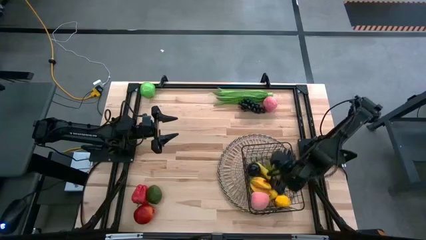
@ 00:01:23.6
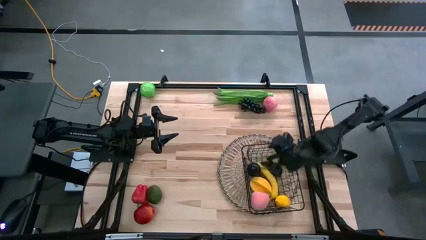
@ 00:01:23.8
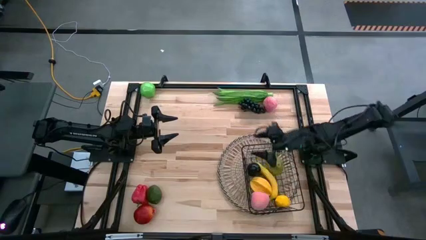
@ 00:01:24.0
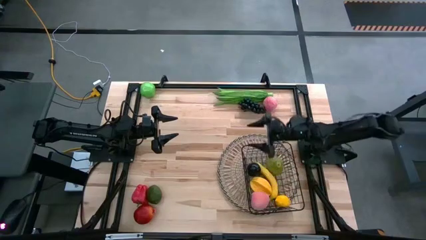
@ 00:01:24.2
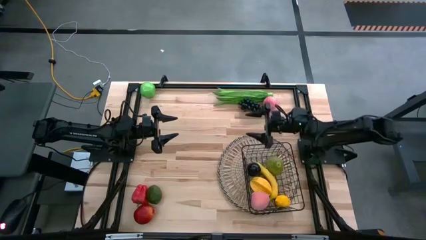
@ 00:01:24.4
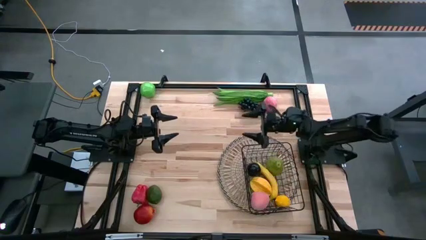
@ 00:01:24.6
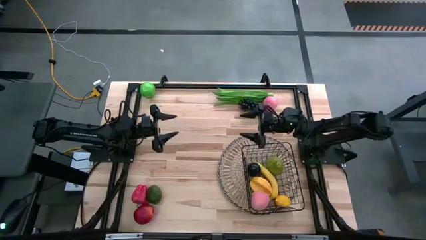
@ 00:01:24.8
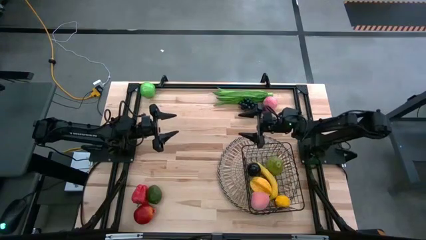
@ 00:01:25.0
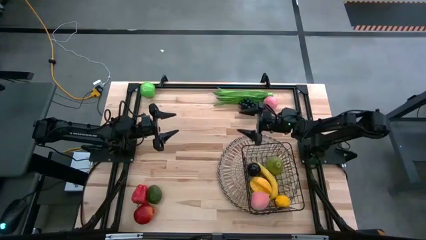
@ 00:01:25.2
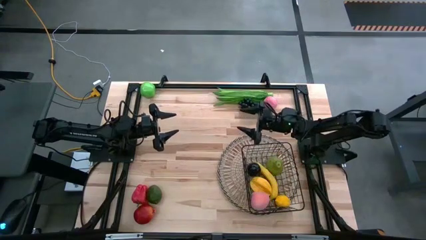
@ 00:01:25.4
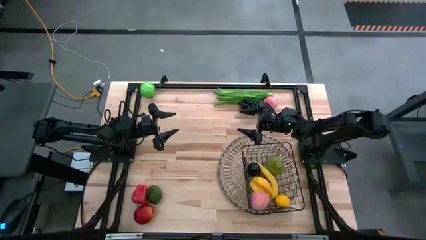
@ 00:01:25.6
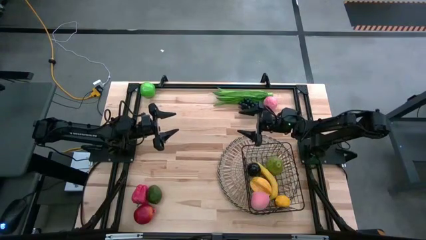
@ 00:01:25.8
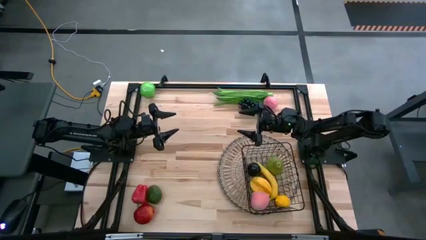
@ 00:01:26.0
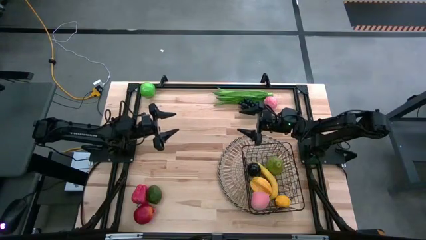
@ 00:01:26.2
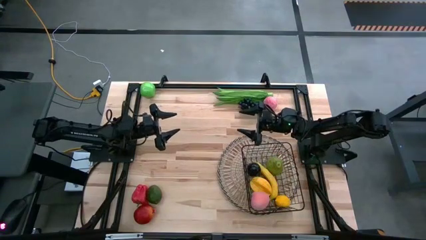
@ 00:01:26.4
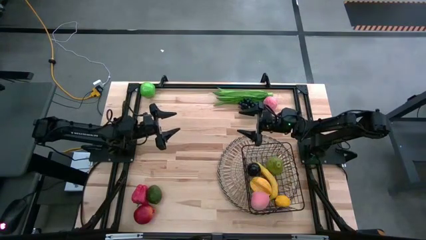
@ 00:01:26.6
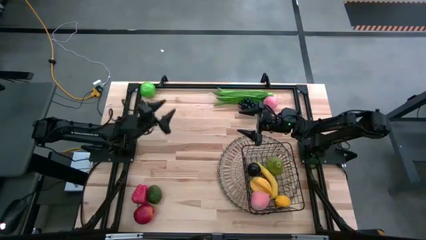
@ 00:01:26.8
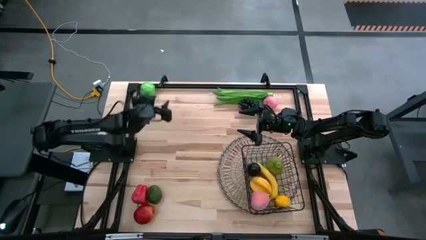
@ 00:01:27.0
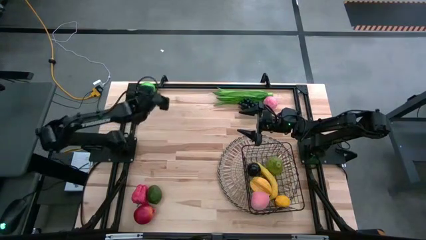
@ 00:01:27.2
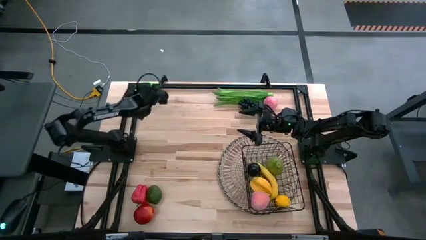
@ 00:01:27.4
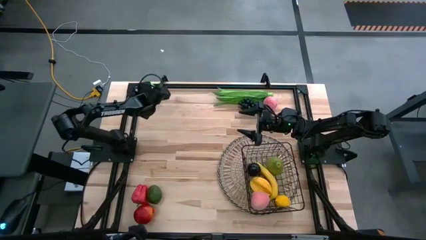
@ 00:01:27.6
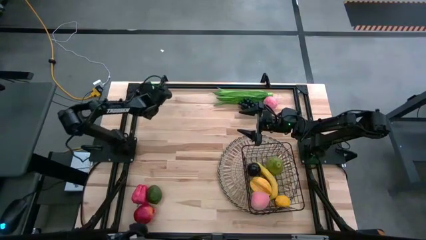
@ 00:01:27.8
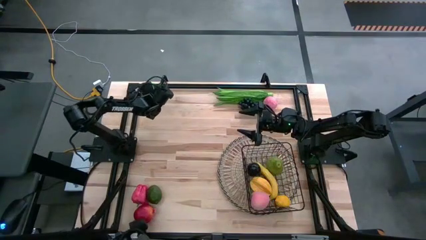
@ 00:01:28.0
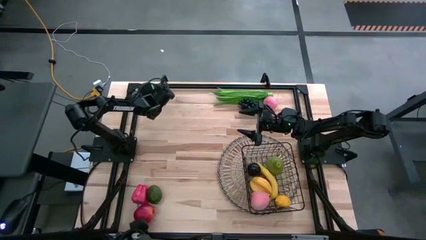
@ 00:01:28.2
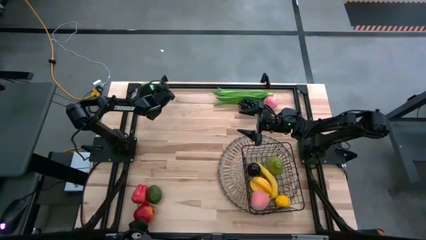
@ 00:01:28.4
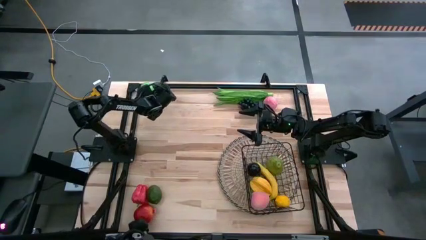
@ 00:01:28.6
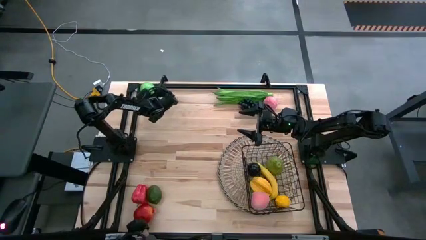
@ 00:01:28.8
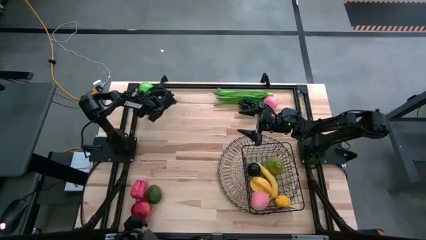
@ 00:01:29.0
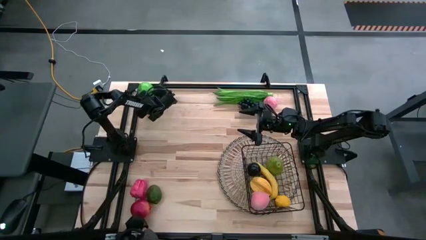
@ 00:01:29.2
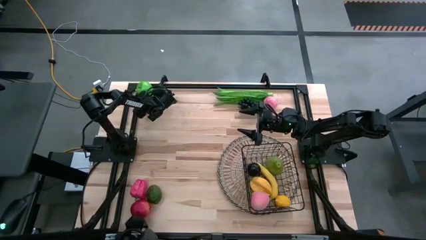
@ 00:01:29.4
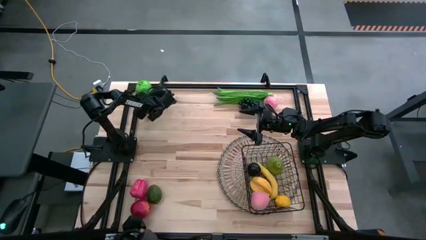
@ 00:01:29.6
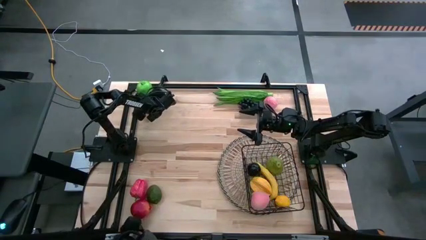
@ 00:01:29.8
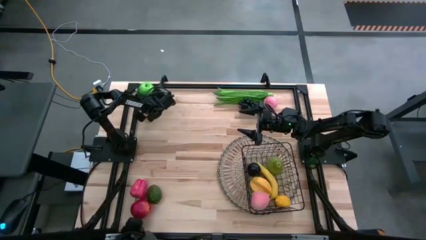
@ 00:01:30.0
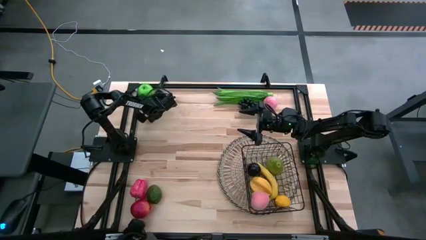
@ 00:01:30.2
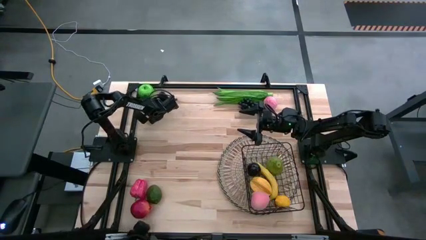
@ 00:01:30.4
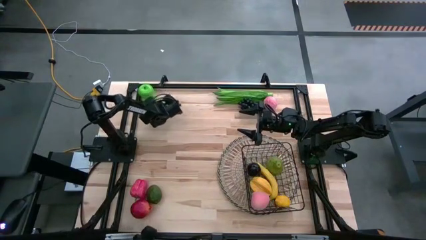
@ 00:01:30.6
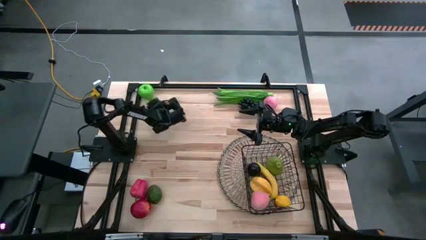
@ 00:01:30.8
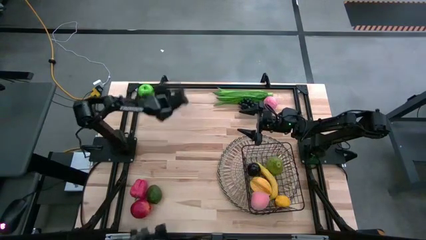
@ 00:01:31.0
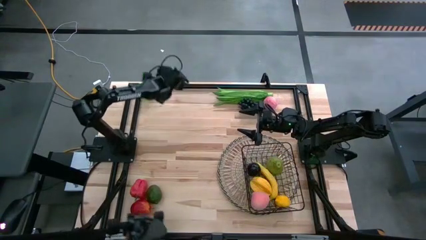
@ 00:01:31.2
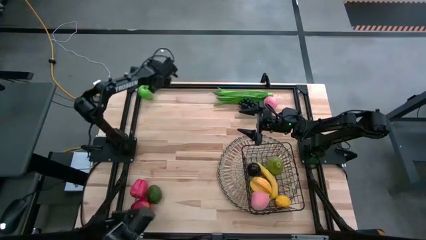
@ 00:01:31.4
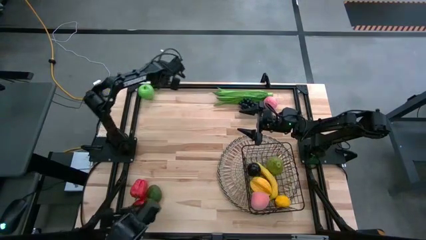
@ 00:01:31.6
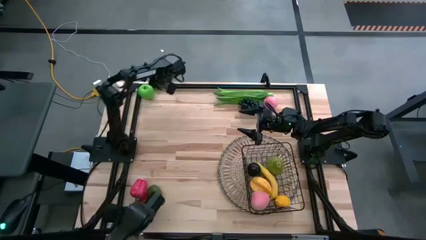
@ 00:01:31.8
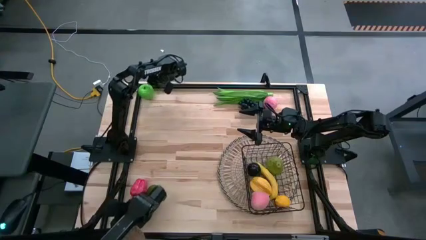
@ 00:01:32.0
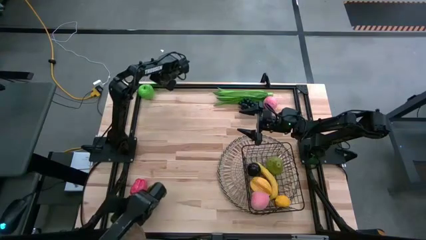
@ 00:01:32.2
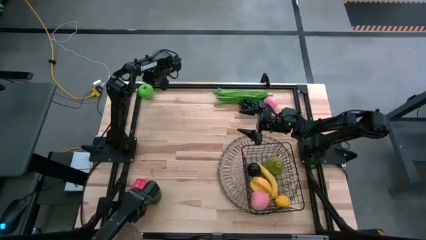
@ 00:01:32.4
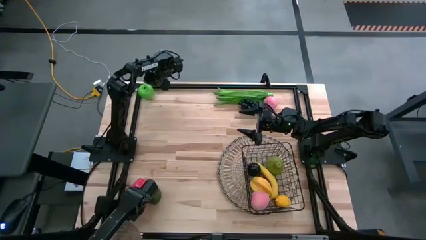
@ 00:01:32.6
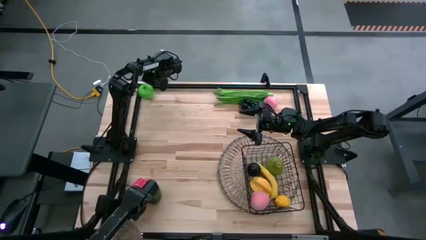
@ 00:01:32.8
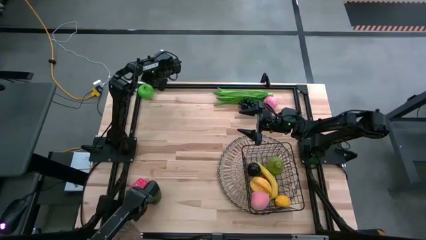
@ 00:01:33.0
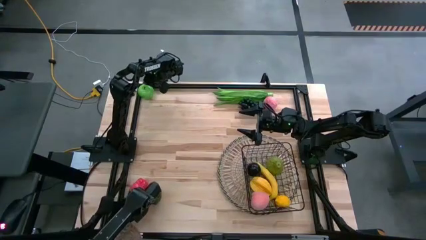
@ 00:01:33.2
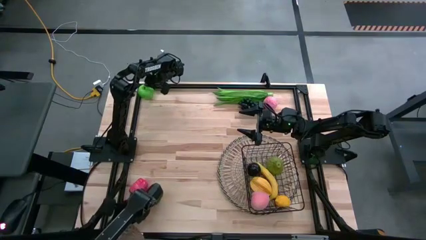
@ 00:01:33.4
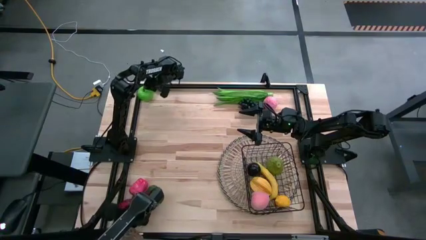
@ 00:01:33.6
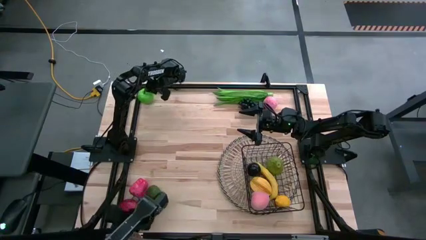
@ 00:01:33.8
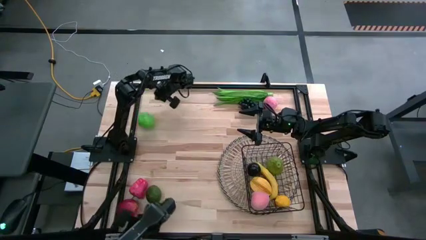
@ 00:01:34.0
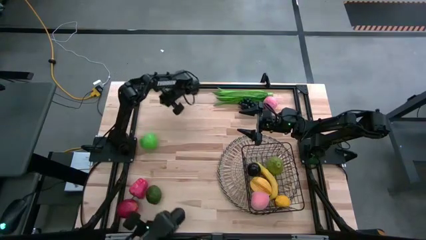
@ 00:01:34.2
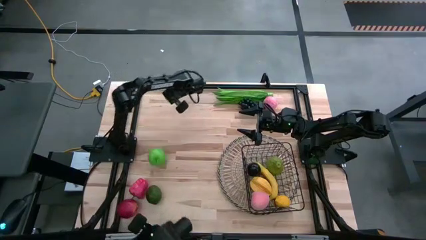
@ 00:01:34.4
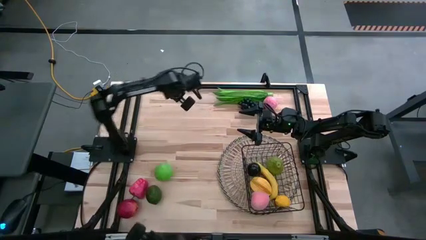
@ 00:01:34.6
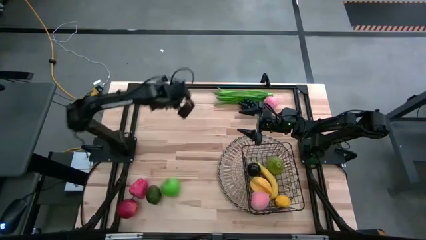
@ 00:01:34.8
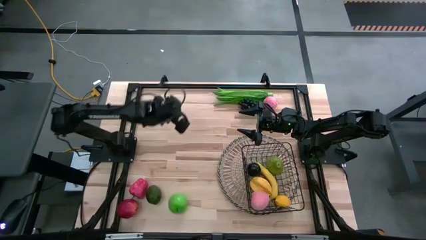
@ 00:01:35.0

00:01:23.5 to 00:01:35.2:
Task: Build produce basket
Put the green apple into the wire basket
